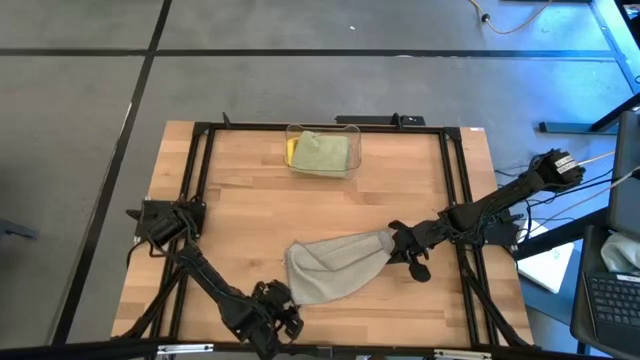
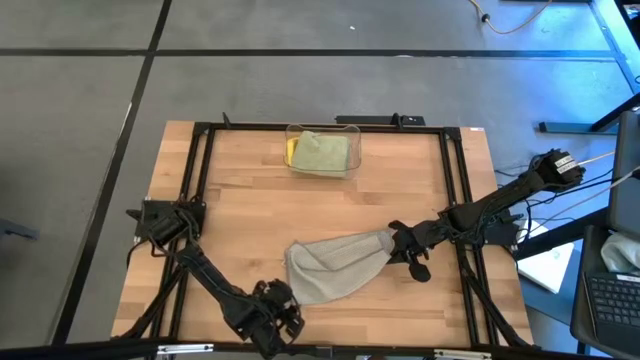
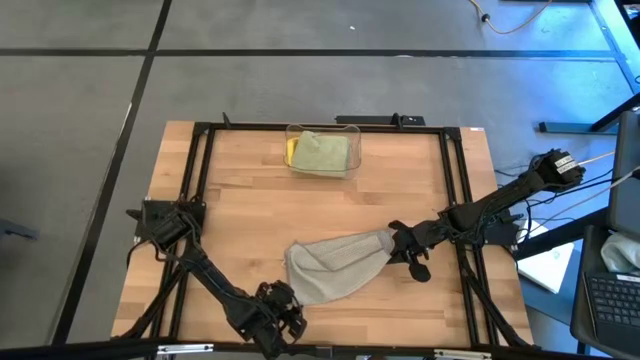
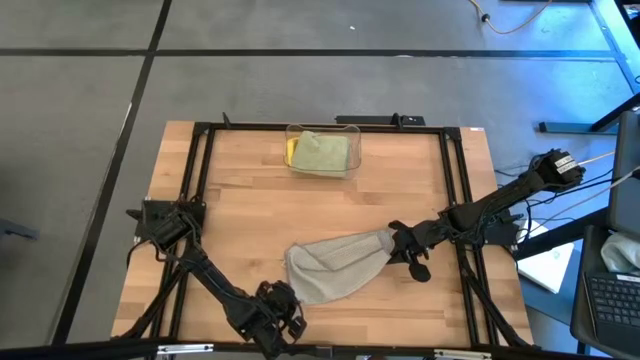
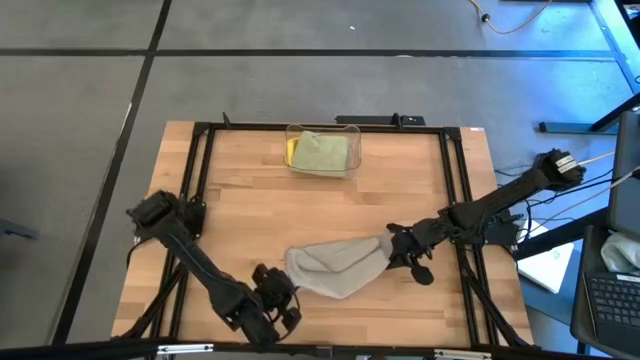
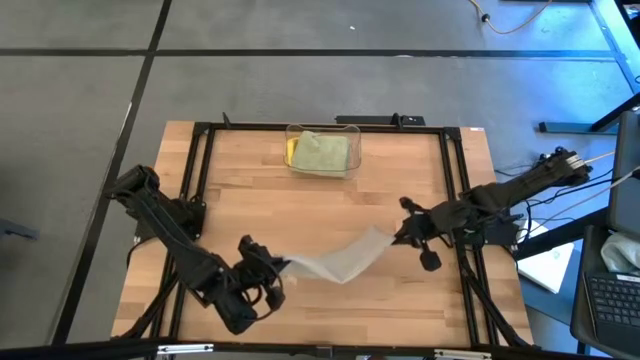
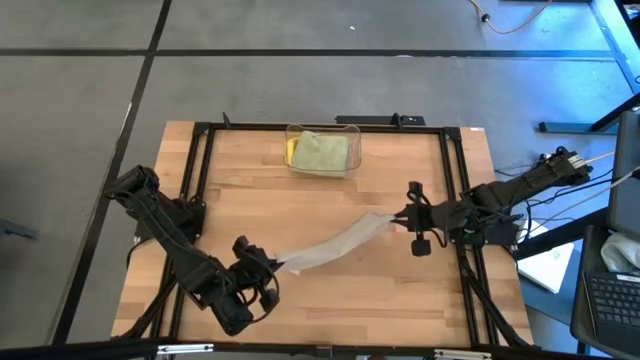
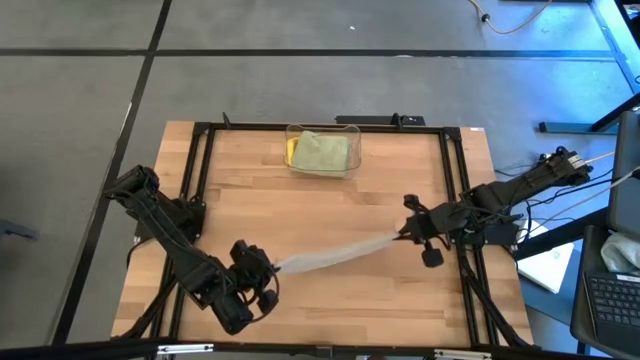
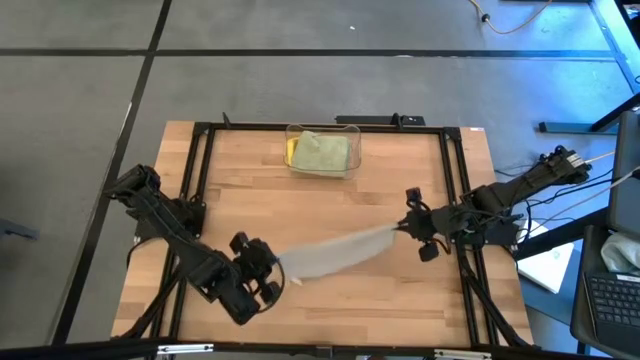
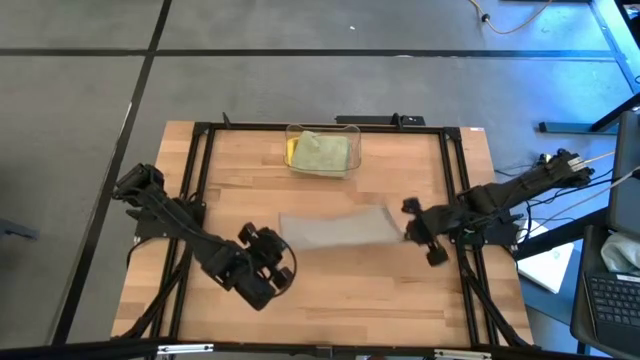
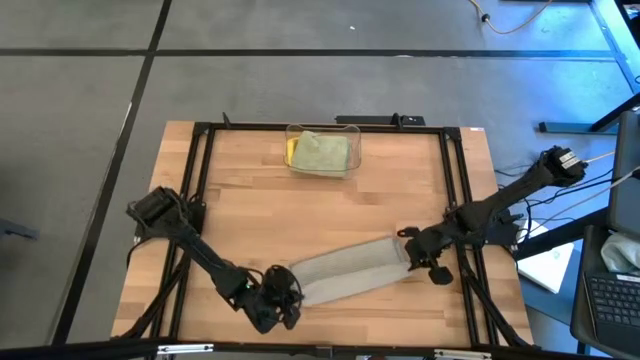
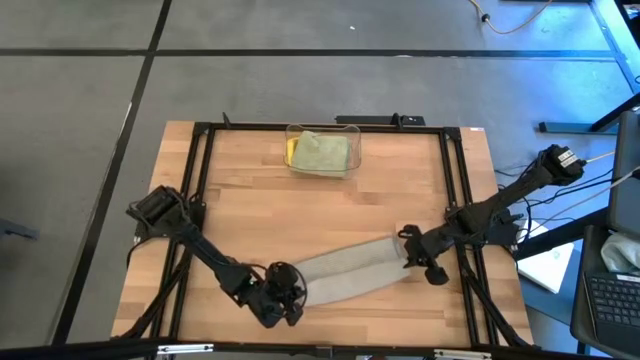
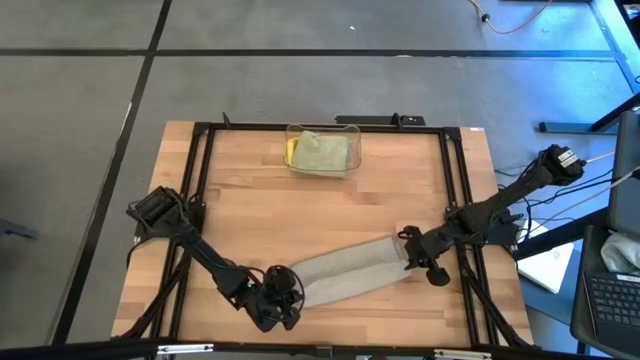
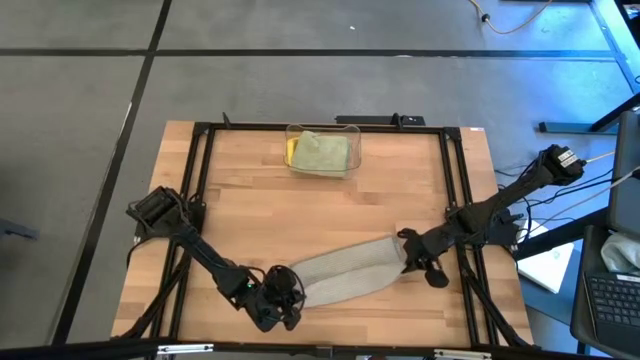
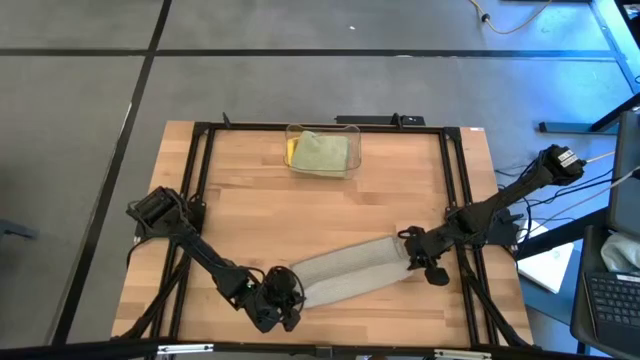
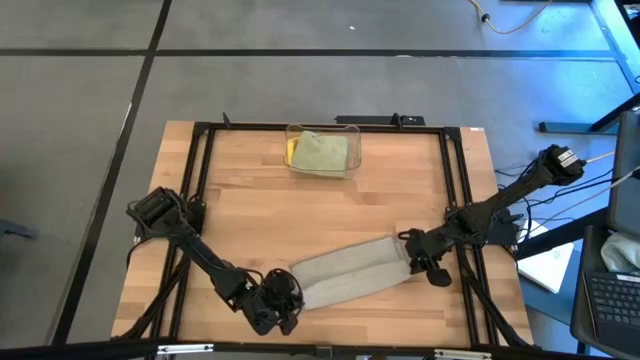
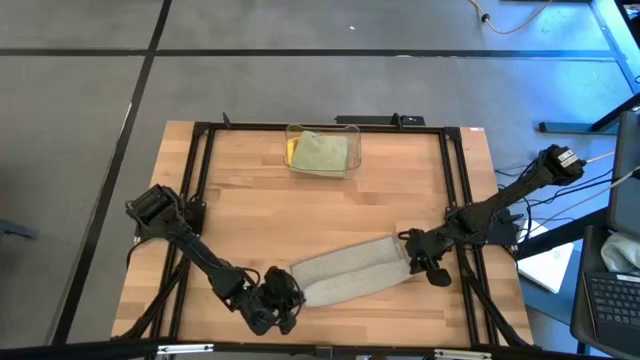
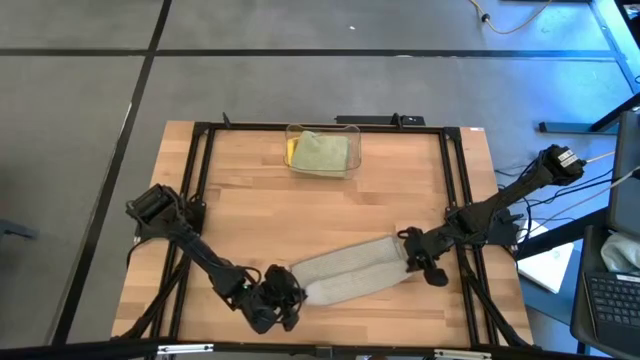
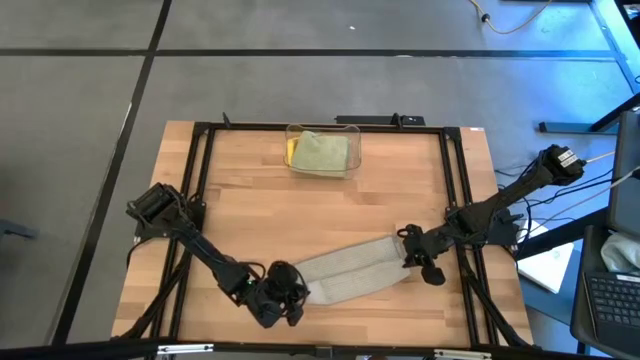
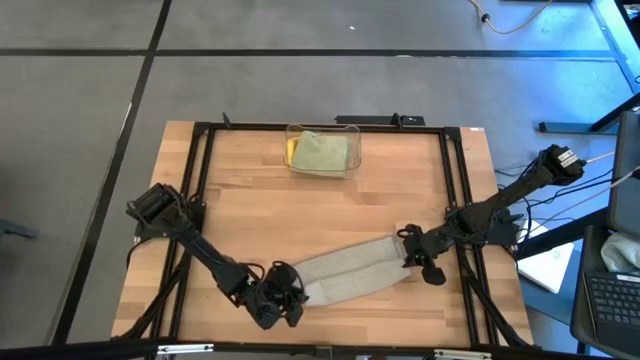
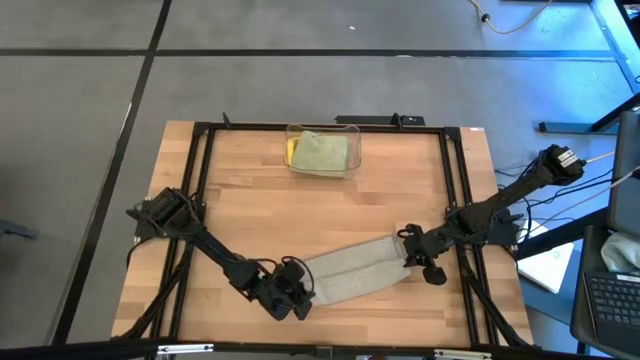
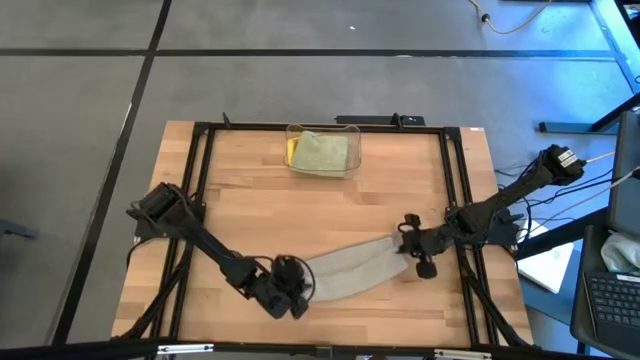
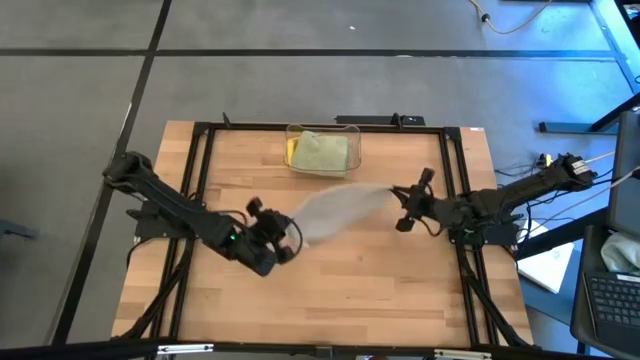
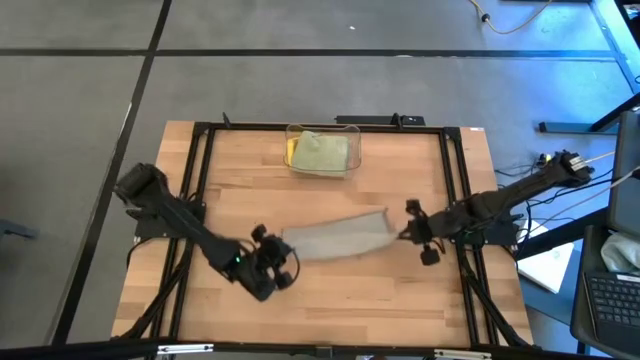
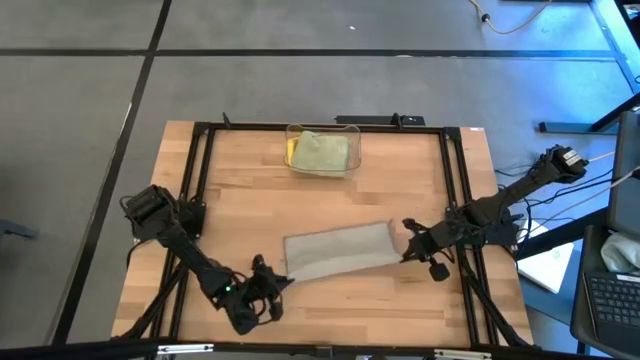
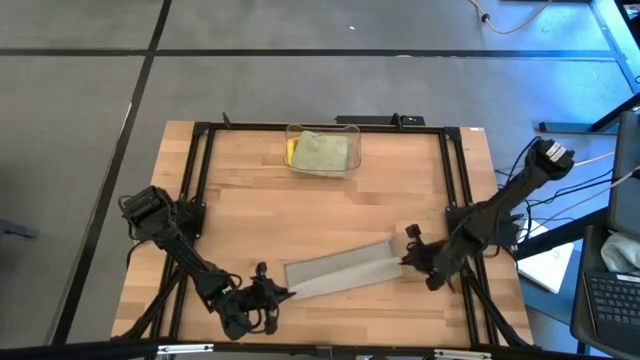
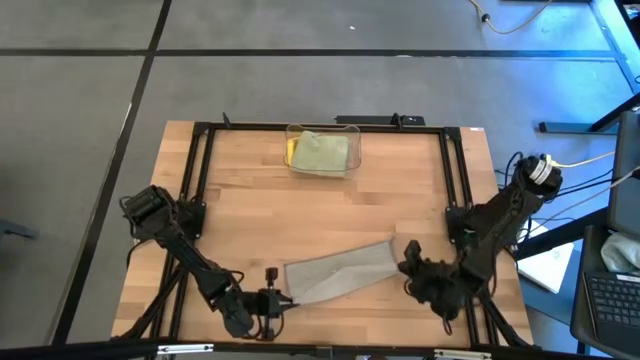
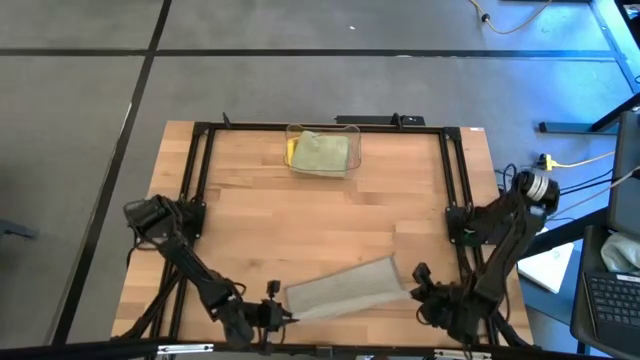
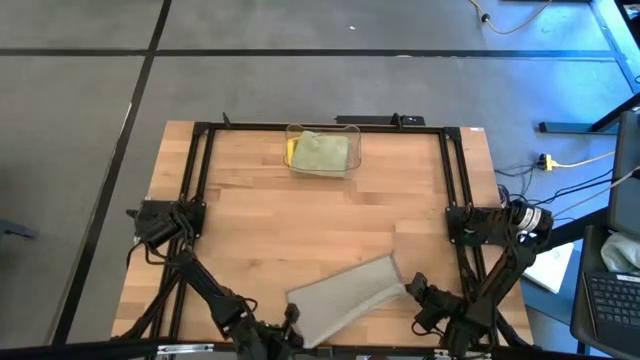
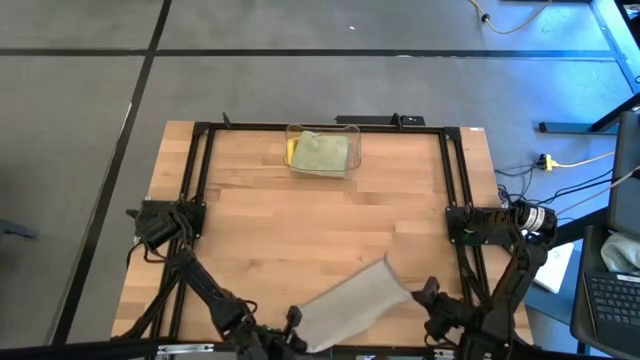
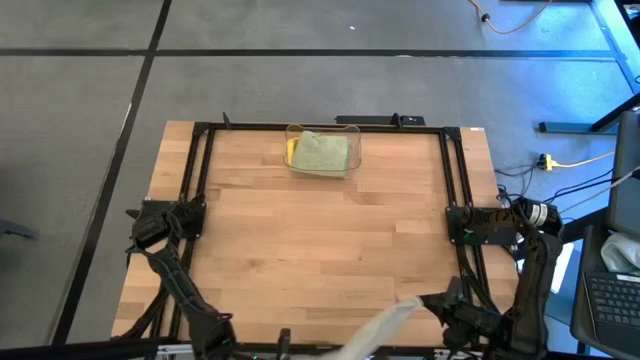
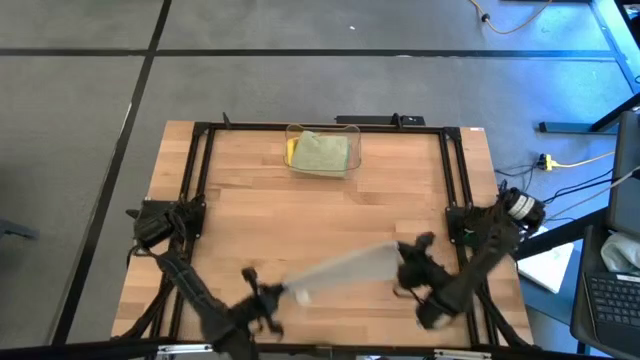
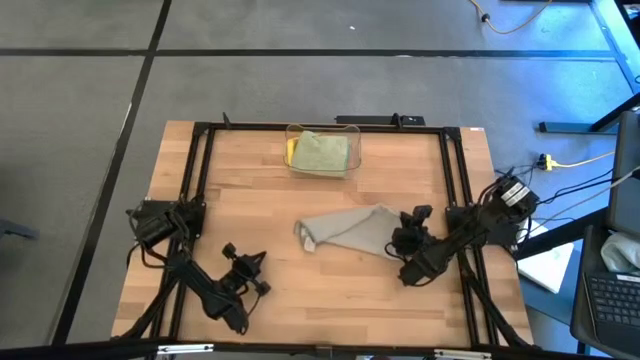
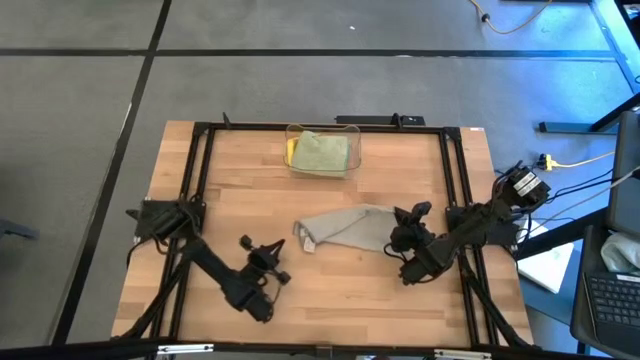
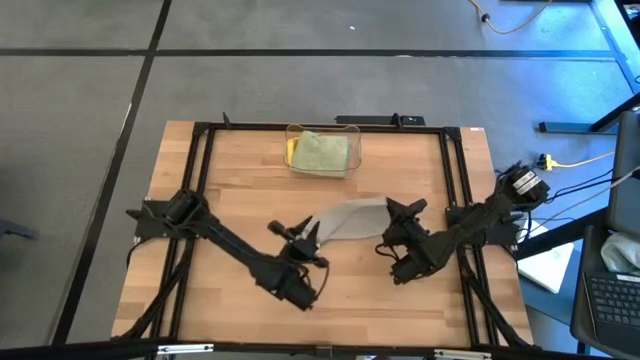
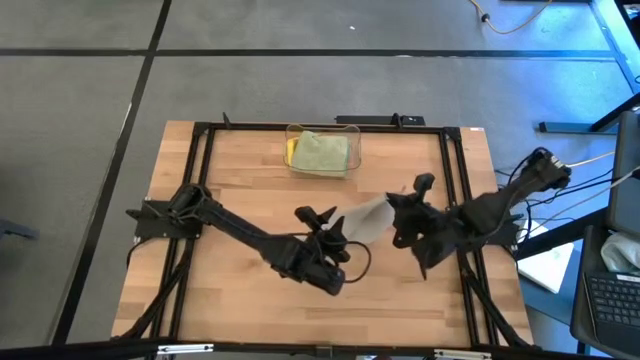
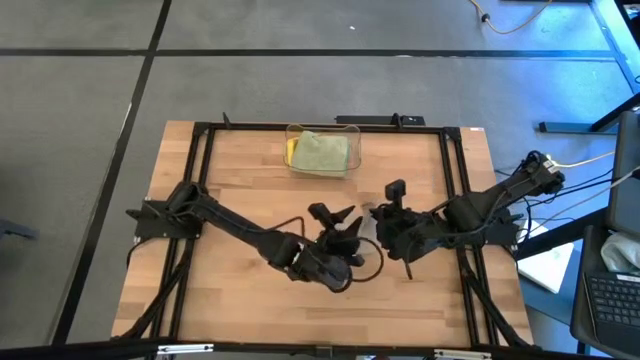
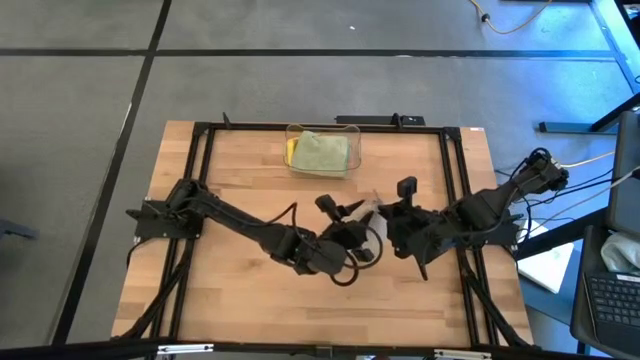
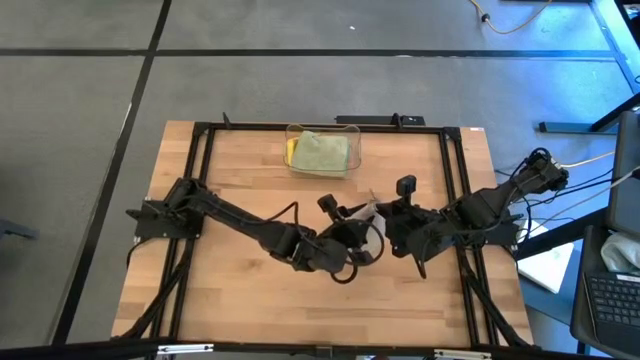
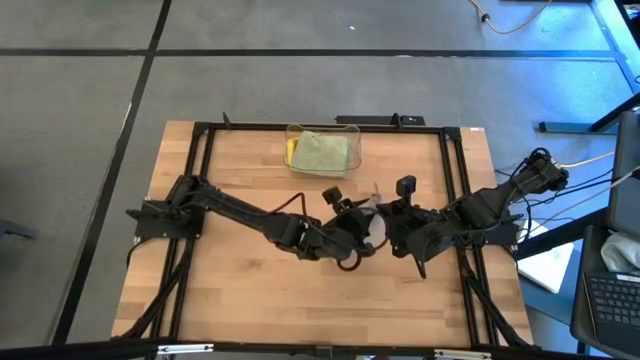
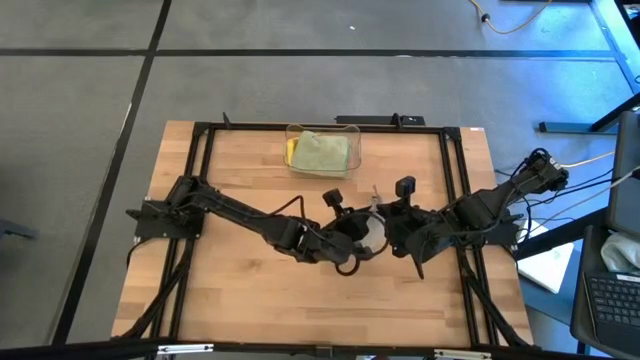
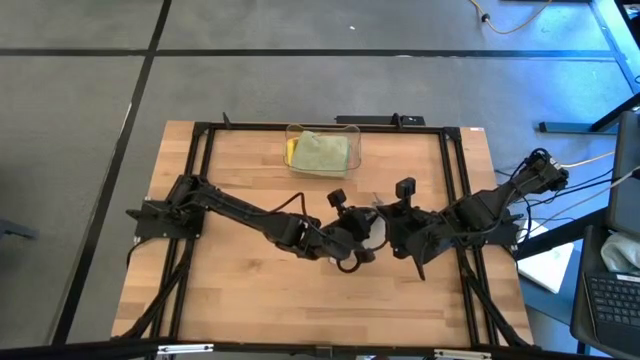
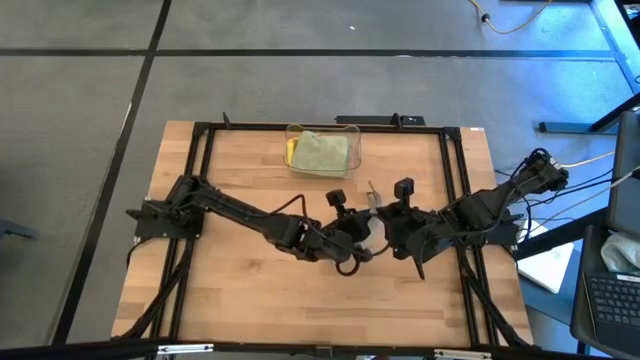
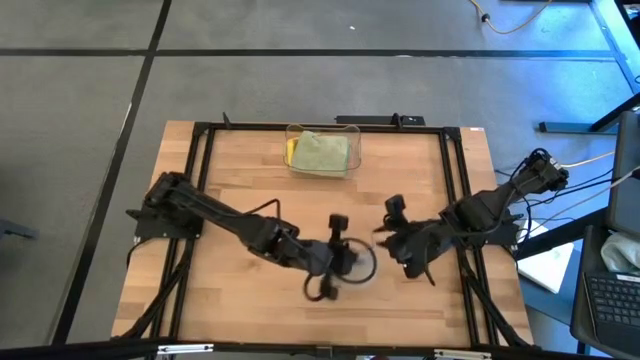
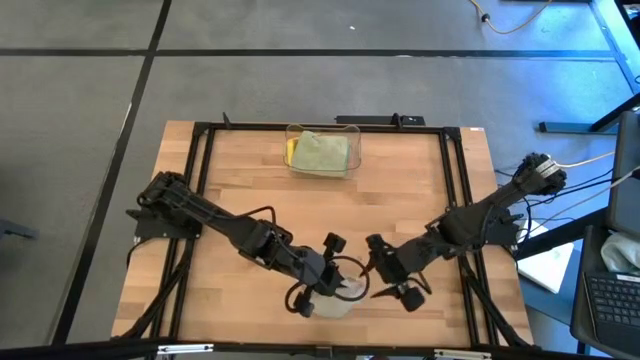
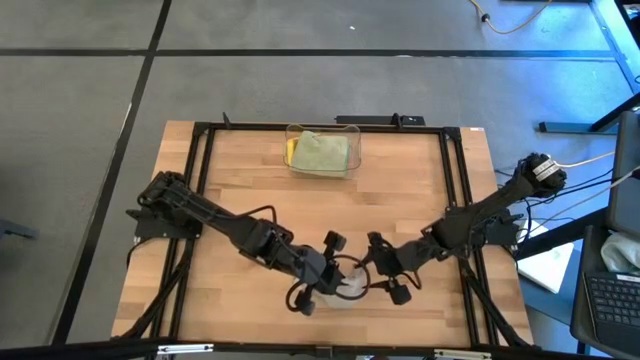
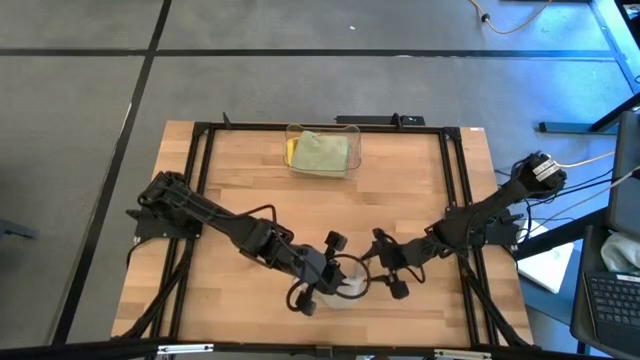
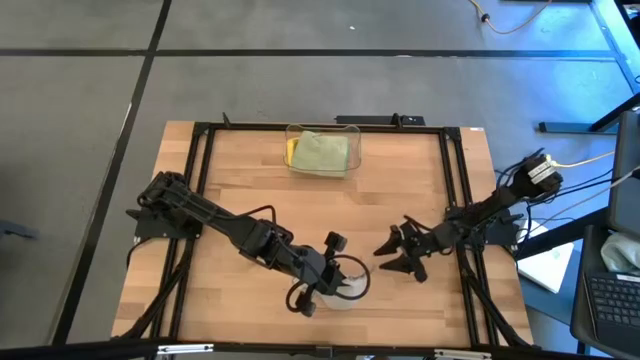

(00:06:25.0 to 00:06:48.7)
Task: Fold microfiber towels
Fold the gray microfiber cloth
